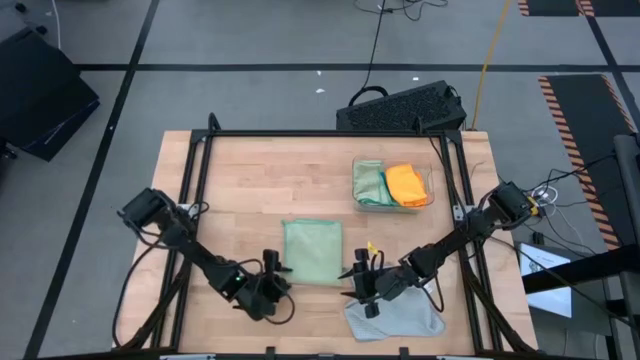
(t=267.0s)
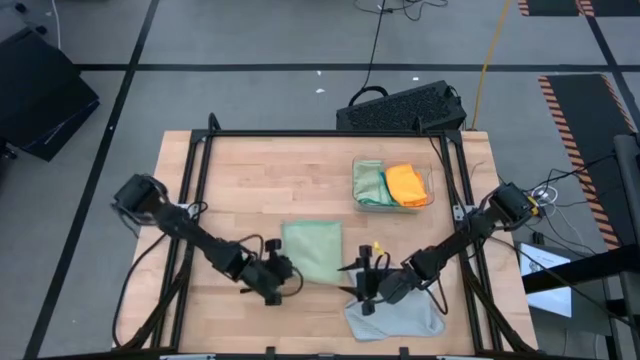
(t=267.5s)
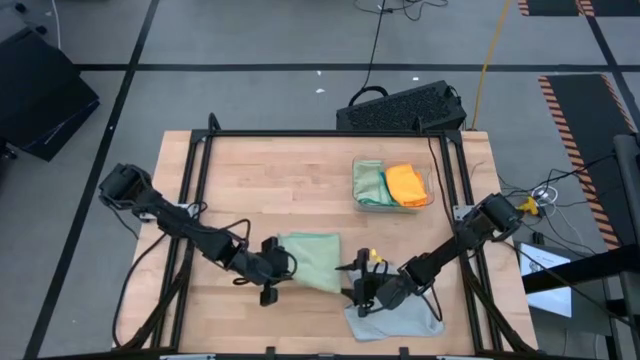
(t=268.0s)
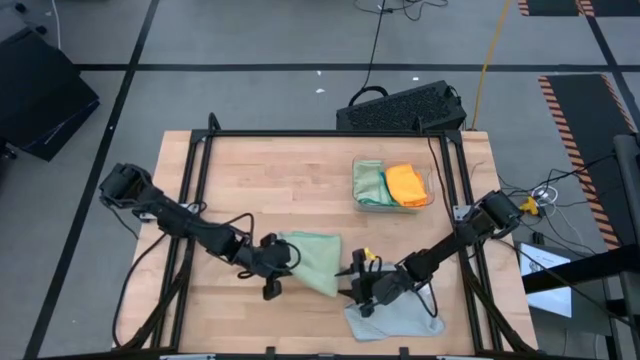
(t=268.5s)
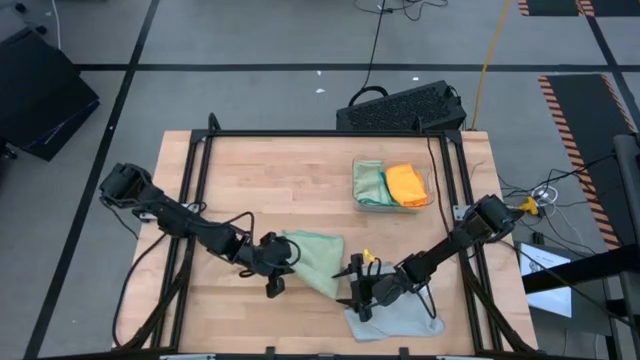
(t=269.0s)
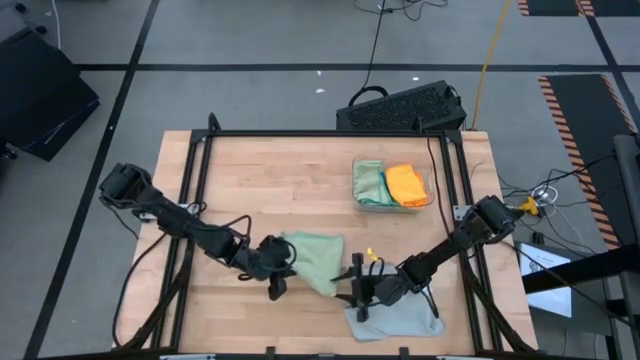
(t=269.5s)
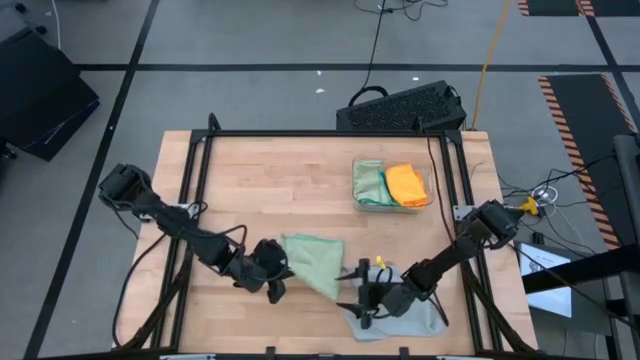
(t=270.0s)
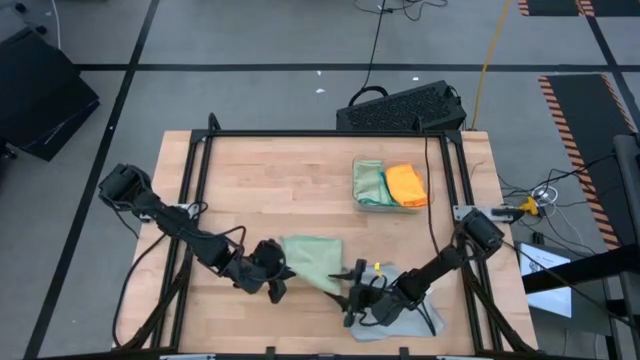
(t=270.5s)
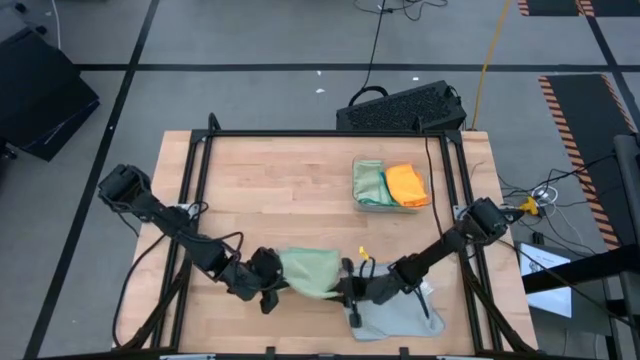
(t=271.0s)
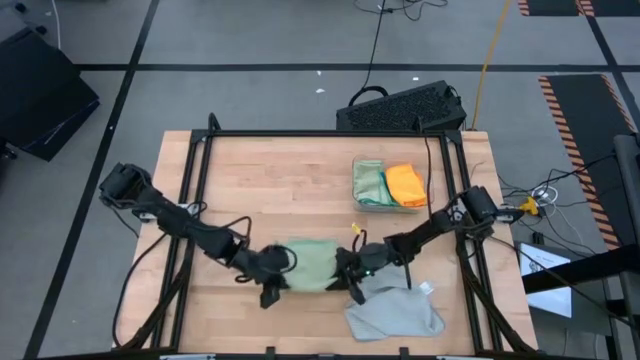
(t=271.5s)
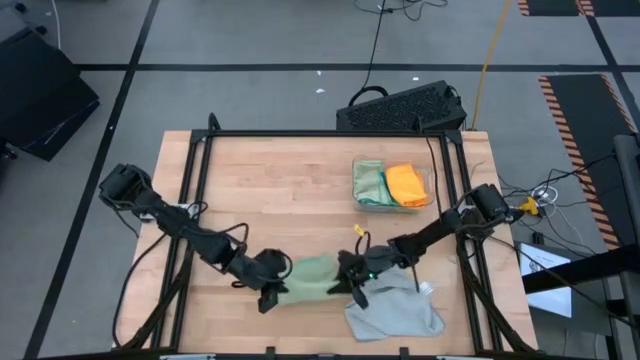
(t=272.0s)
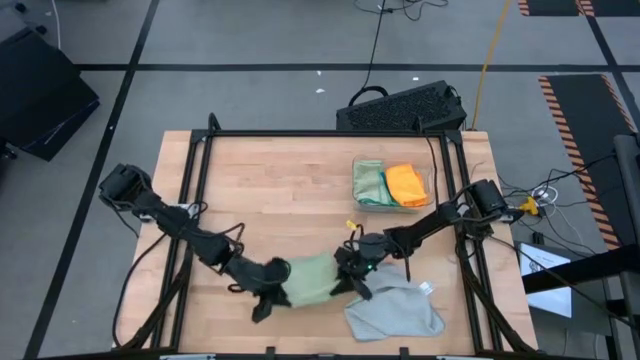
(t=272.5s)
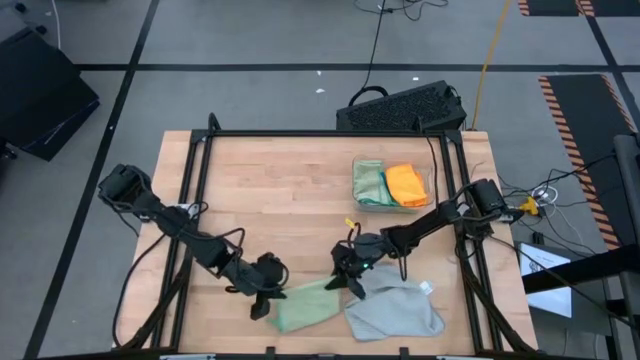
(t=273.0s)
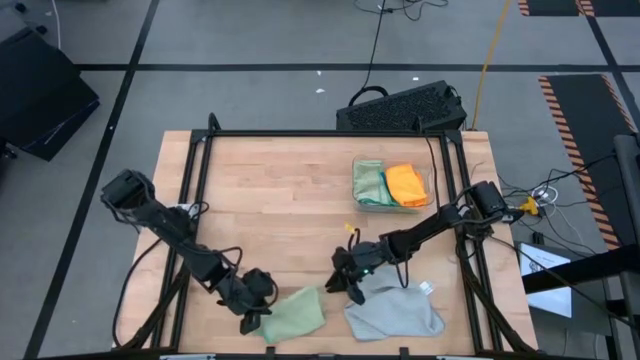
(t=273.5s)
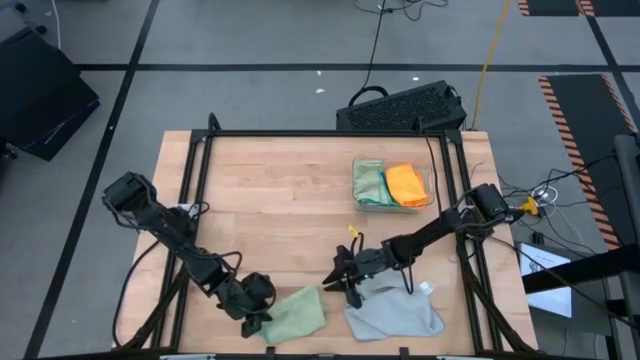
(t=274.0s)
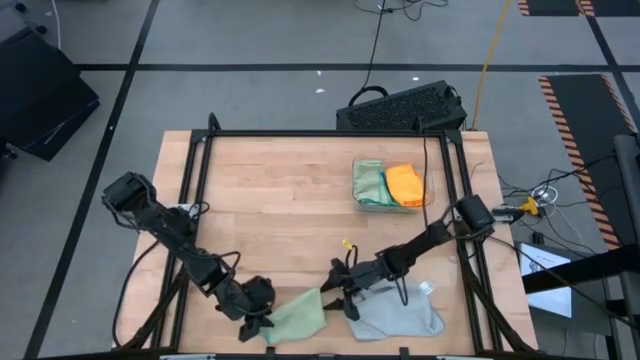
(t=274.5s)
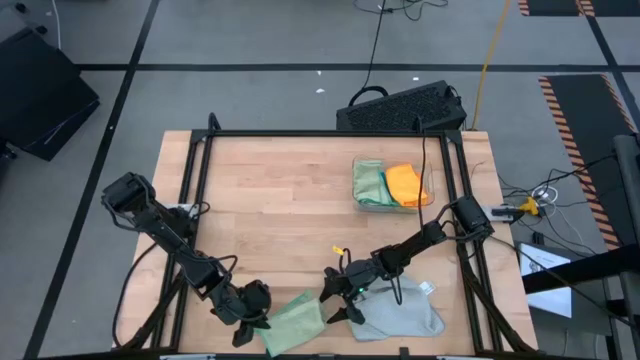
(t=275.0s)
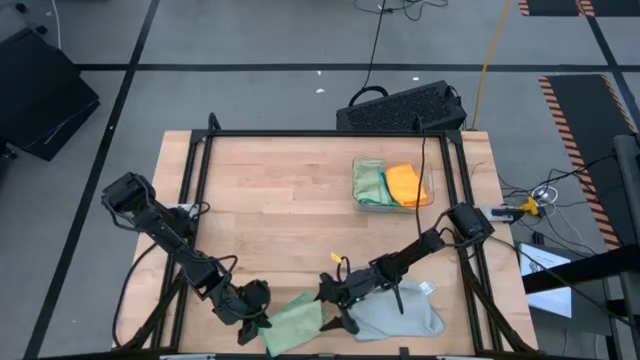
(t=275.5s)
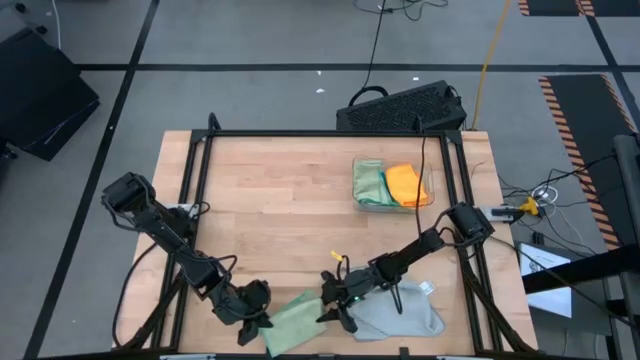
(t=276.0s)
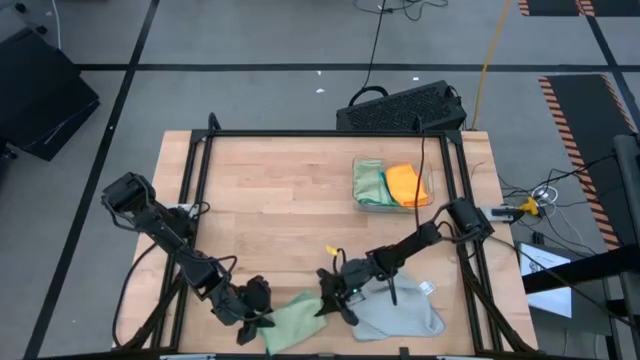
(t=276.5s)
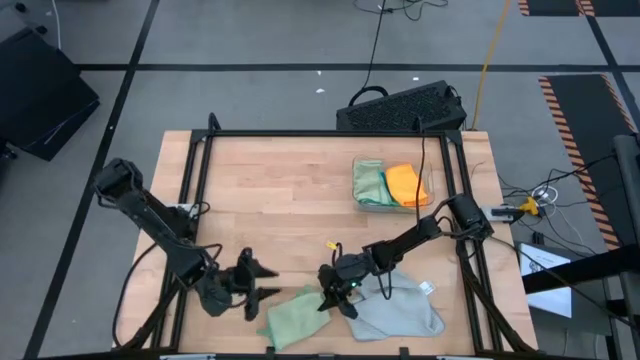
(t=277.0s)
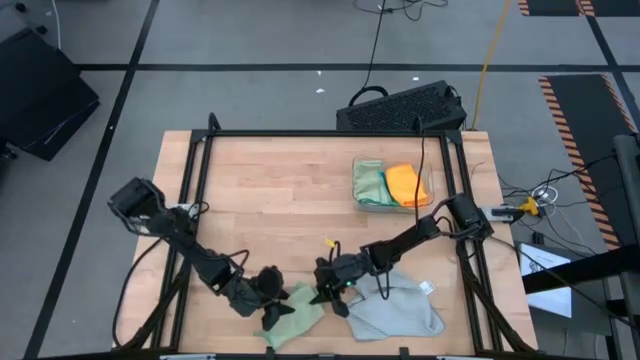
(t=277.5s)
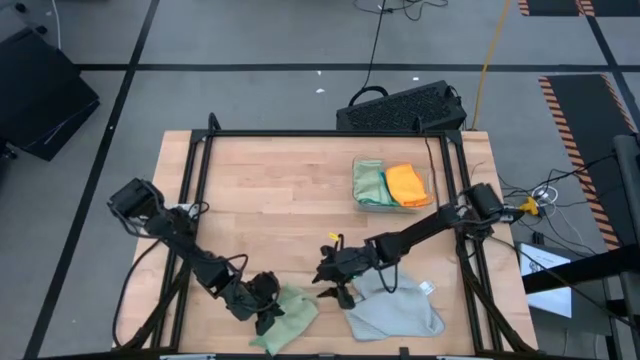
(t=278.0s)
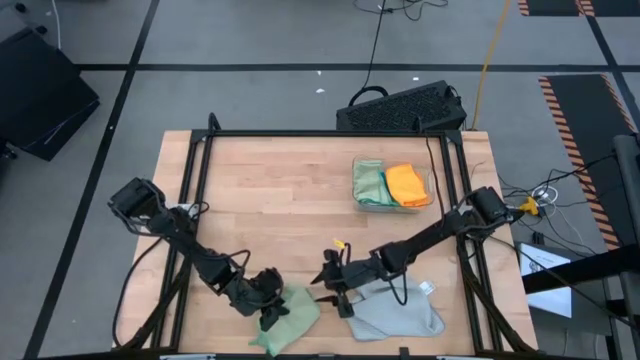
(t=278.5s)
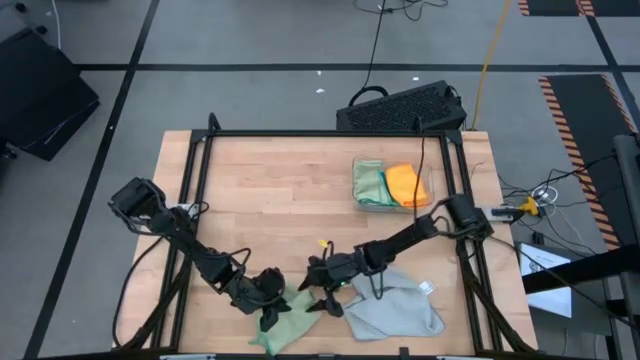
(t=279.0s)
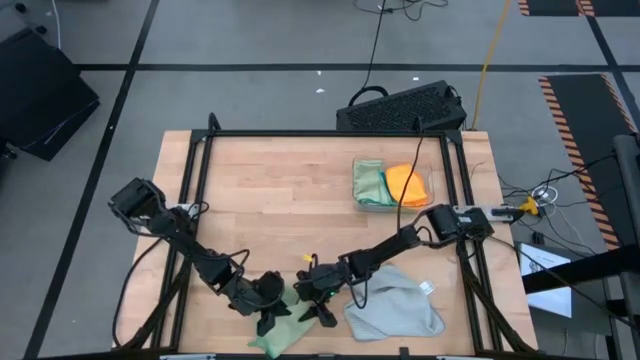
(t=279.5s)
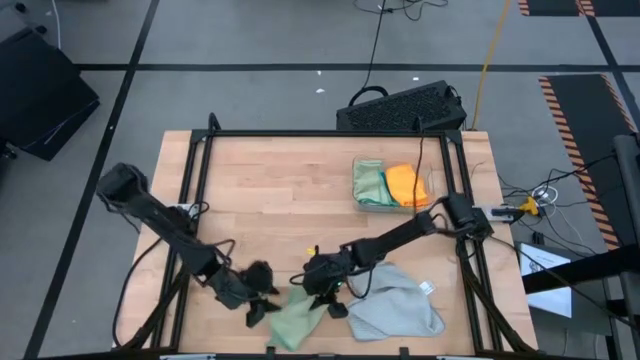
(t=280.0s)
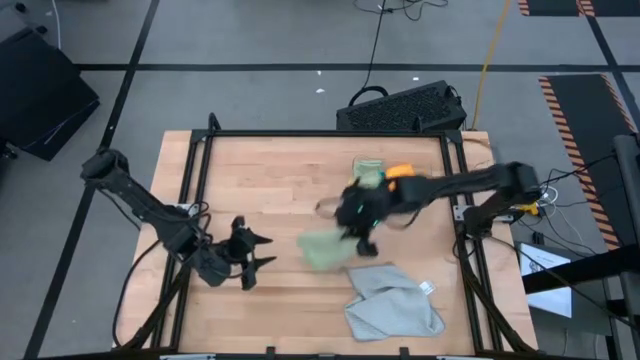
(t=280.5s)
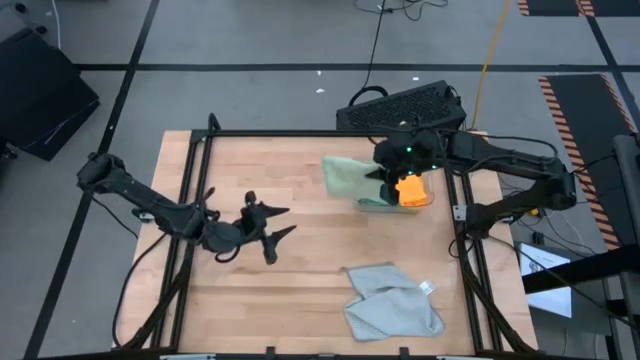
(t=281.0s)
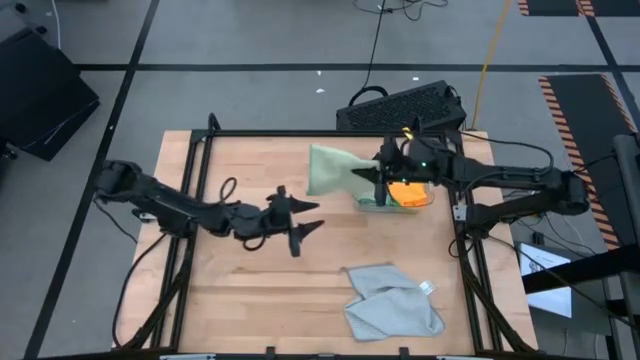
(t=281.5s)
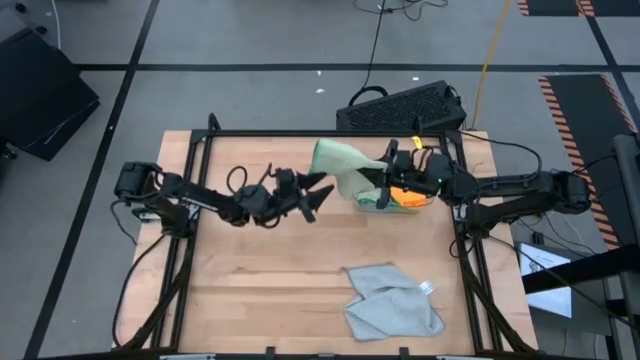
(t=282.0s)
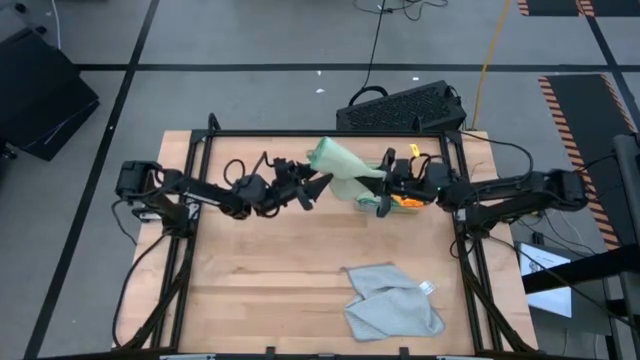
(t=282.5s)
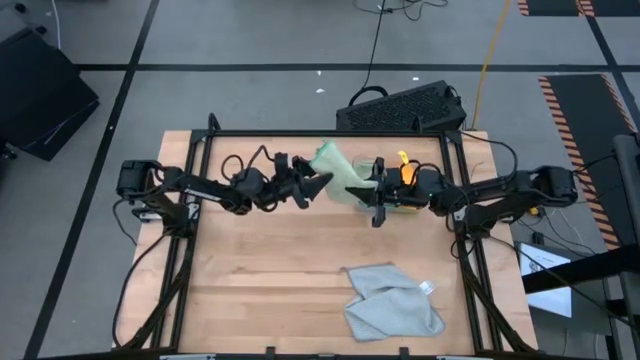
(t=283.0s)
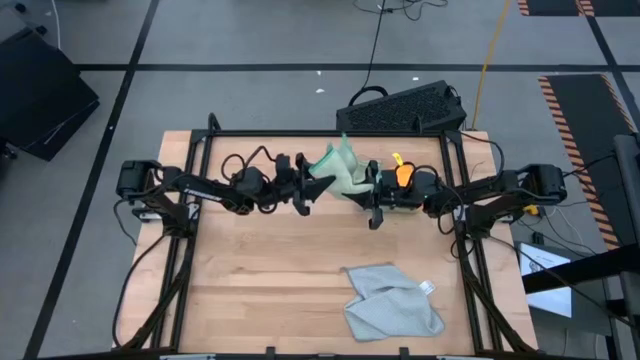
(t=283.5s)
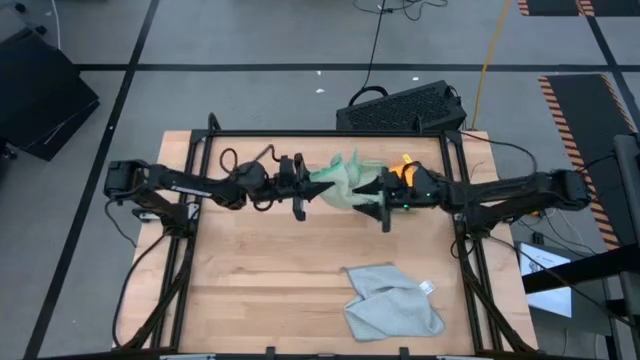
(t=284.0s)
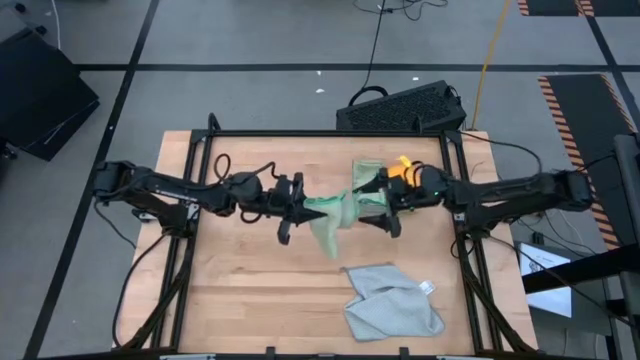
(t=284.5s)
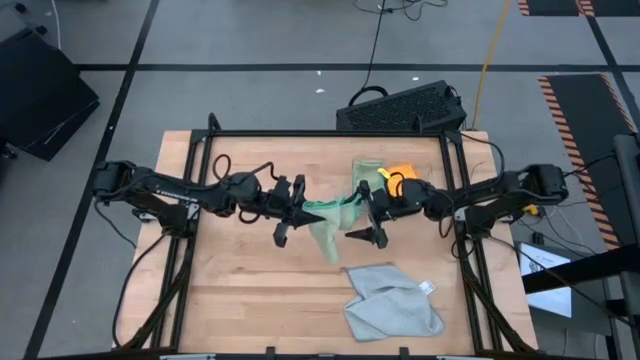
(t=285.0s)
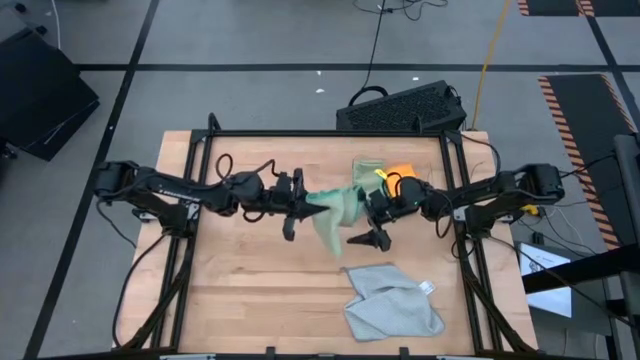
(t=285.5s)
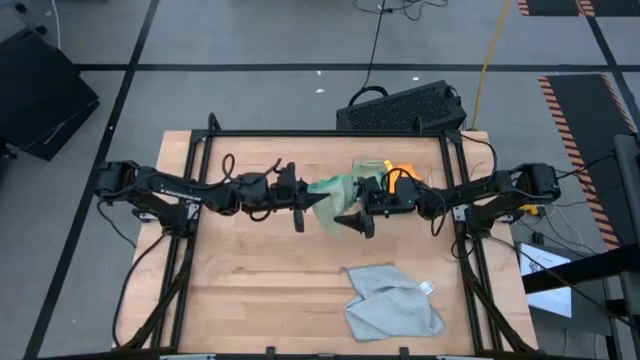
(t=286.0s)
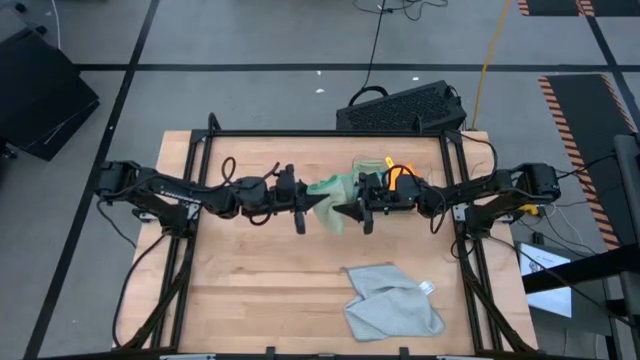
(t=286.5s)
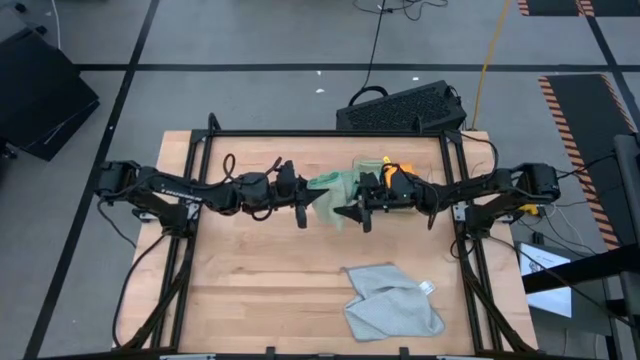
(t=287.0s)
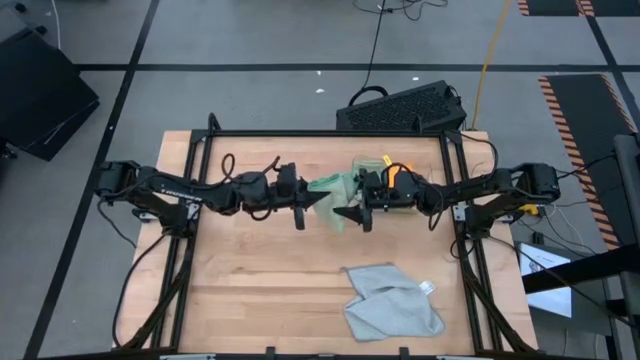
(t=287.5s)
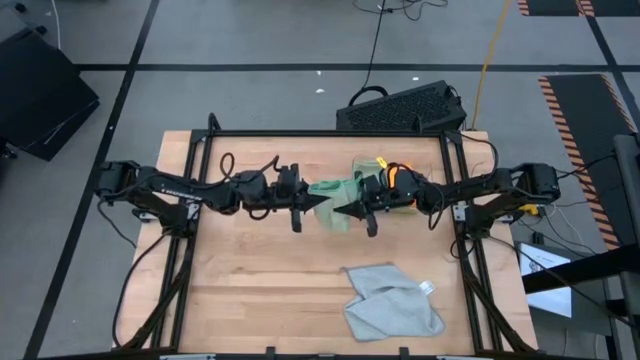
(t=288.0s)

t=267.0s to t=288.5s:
Task: Fold microfiber towels
Fold the light green microfiber cloth
